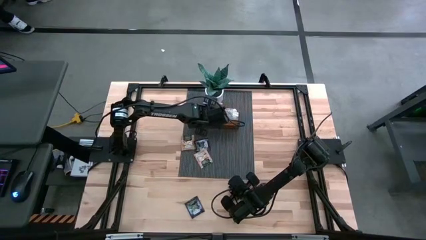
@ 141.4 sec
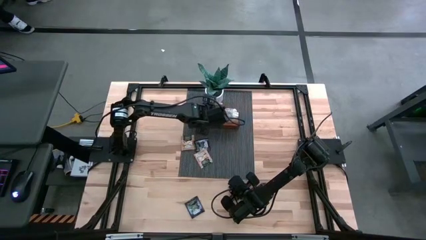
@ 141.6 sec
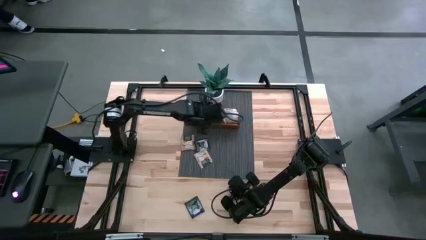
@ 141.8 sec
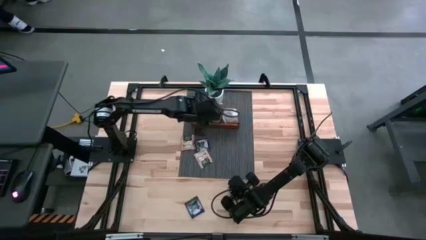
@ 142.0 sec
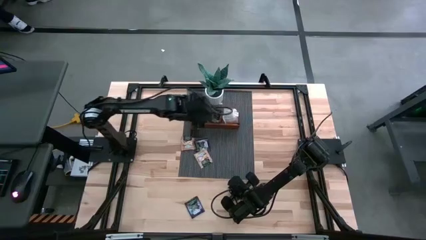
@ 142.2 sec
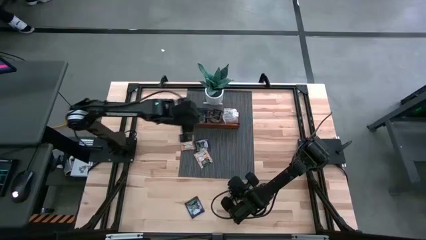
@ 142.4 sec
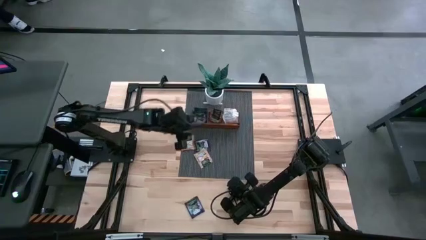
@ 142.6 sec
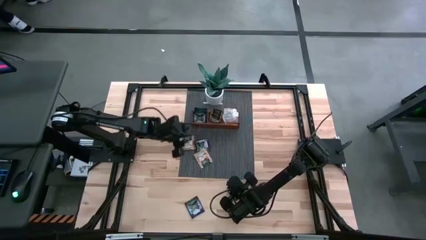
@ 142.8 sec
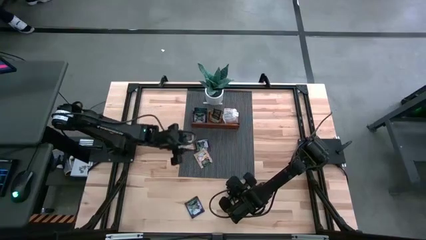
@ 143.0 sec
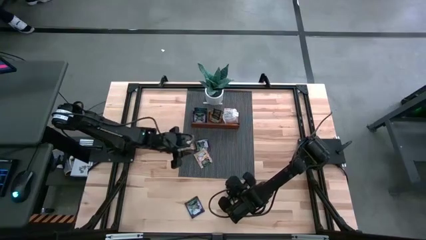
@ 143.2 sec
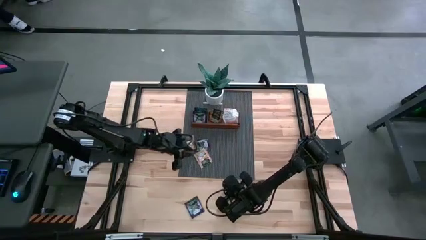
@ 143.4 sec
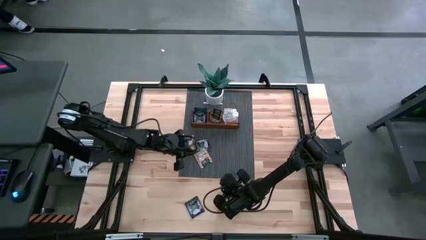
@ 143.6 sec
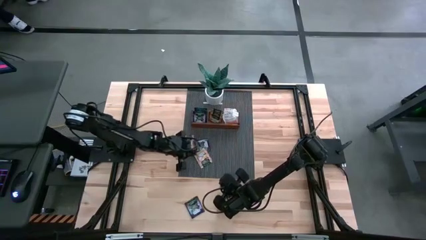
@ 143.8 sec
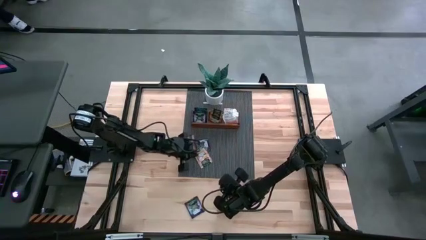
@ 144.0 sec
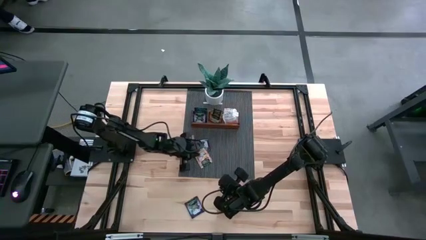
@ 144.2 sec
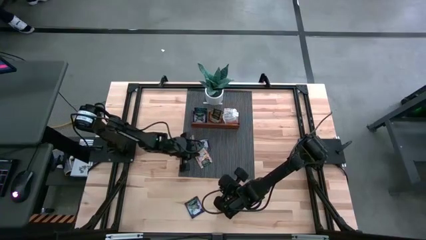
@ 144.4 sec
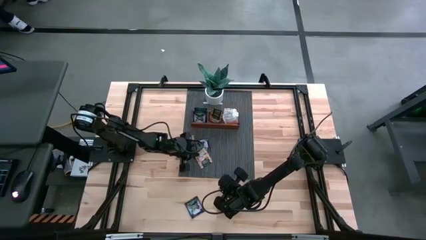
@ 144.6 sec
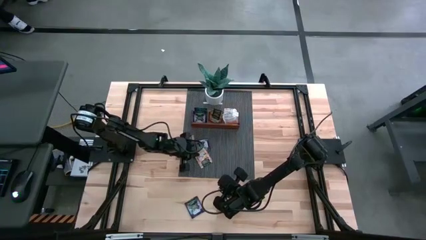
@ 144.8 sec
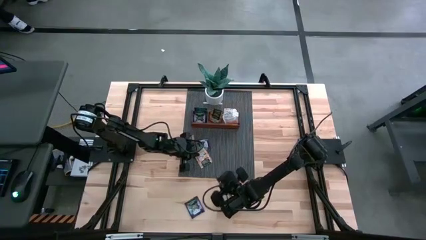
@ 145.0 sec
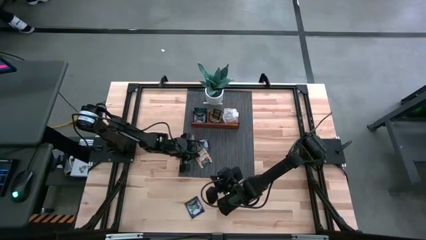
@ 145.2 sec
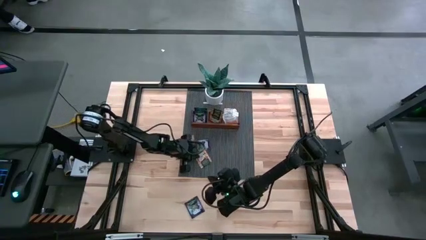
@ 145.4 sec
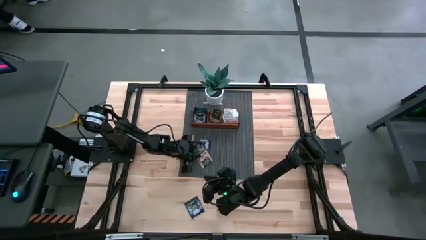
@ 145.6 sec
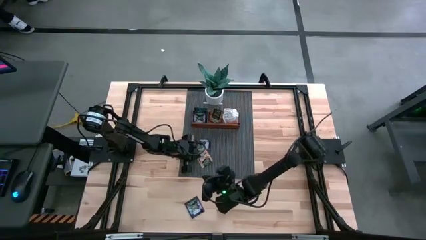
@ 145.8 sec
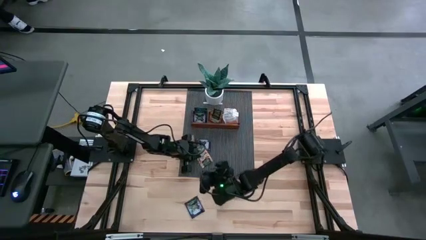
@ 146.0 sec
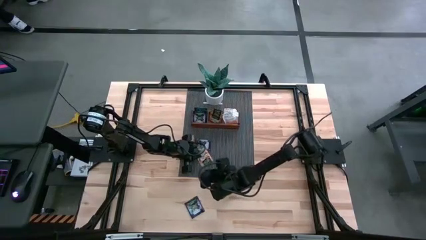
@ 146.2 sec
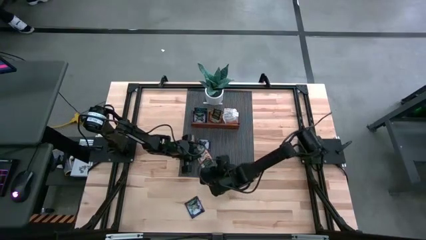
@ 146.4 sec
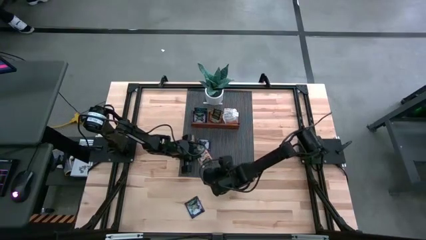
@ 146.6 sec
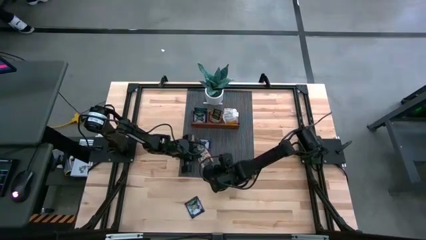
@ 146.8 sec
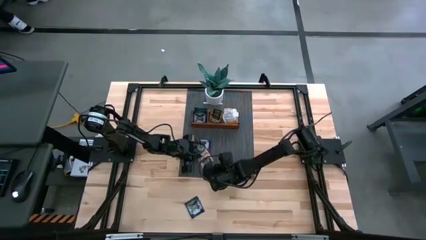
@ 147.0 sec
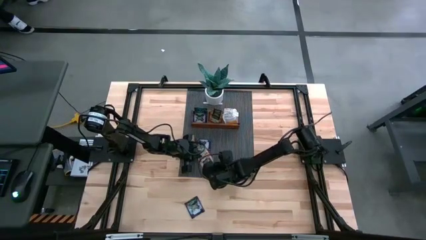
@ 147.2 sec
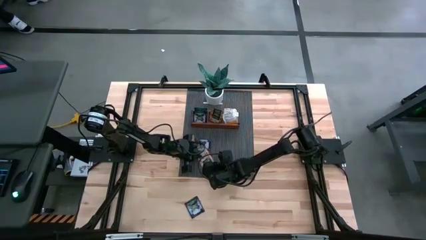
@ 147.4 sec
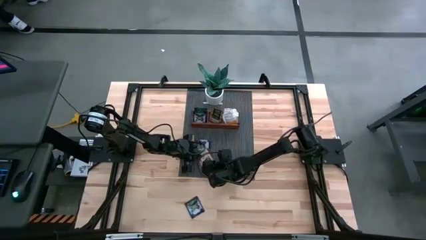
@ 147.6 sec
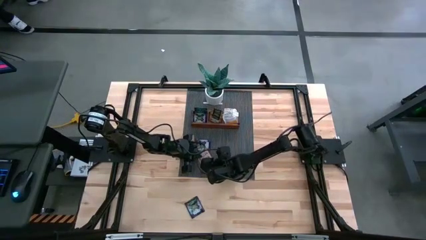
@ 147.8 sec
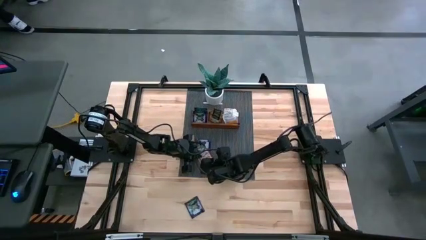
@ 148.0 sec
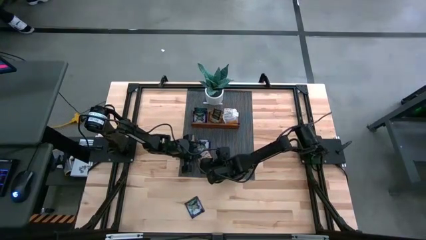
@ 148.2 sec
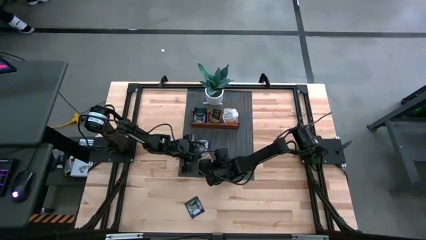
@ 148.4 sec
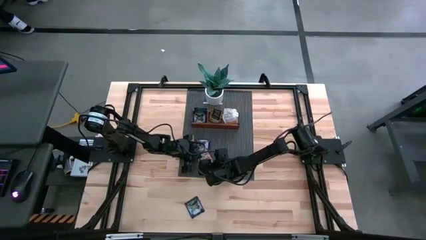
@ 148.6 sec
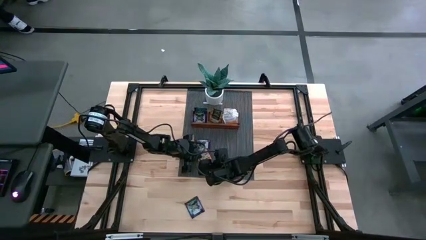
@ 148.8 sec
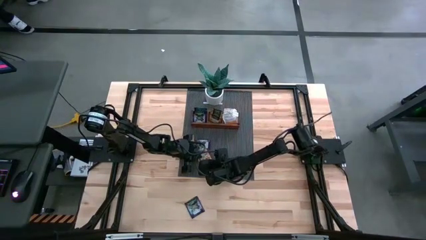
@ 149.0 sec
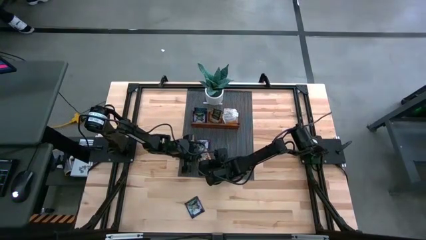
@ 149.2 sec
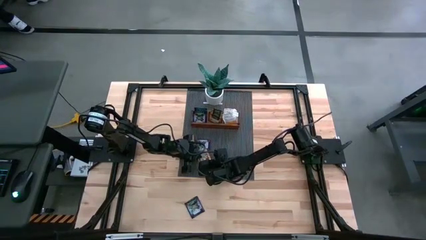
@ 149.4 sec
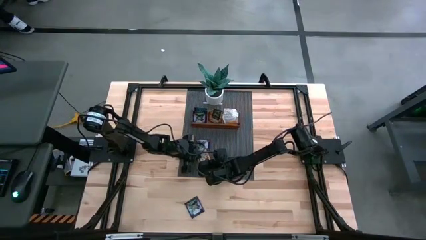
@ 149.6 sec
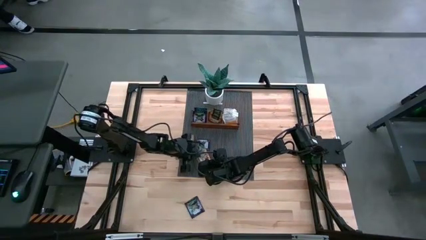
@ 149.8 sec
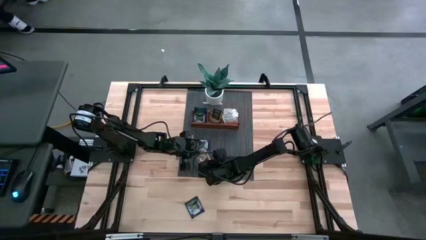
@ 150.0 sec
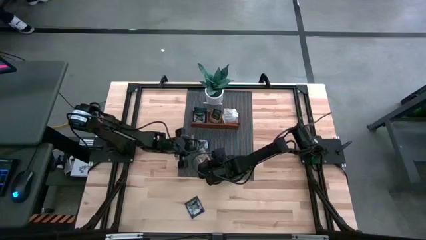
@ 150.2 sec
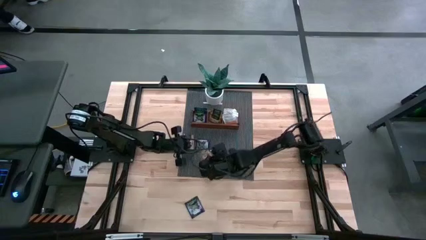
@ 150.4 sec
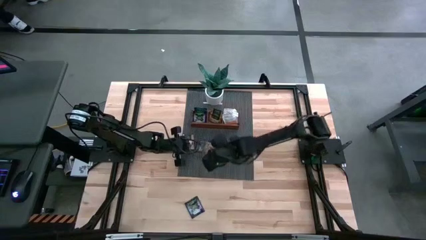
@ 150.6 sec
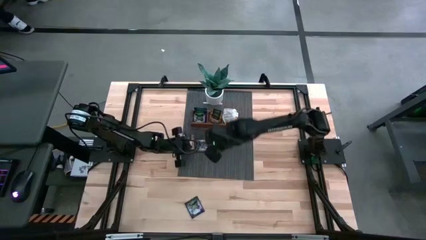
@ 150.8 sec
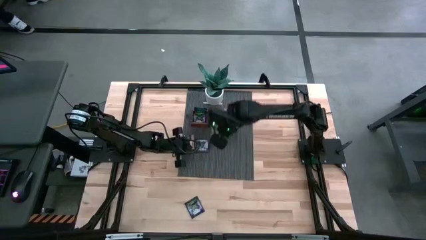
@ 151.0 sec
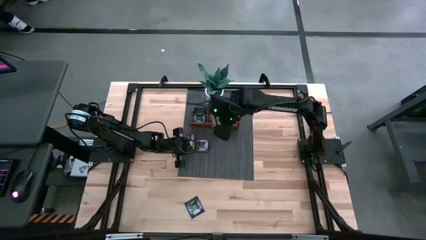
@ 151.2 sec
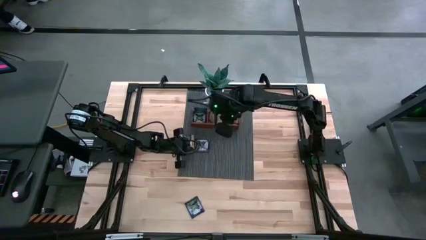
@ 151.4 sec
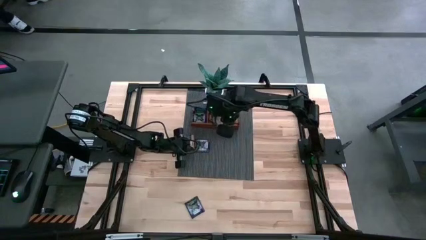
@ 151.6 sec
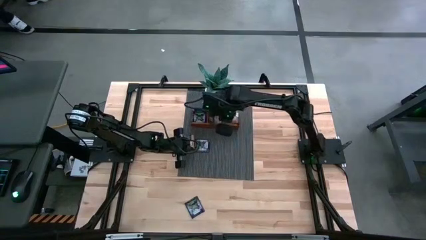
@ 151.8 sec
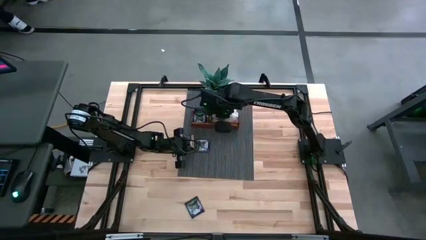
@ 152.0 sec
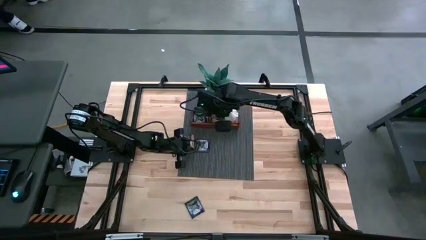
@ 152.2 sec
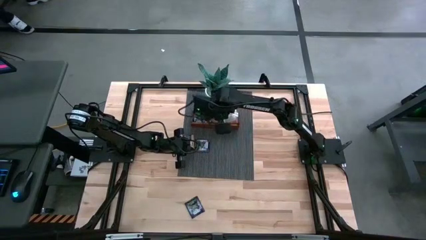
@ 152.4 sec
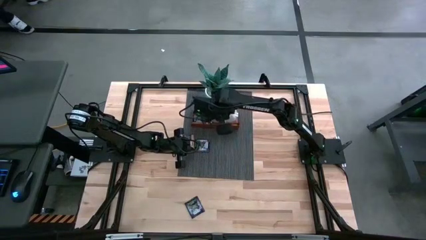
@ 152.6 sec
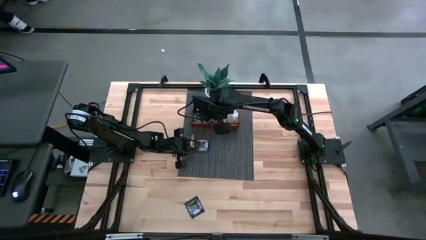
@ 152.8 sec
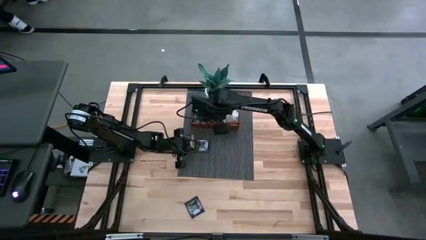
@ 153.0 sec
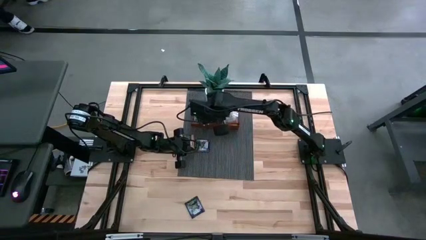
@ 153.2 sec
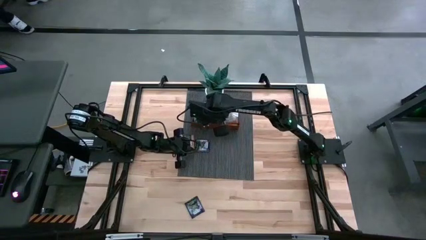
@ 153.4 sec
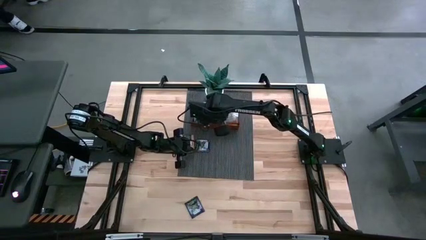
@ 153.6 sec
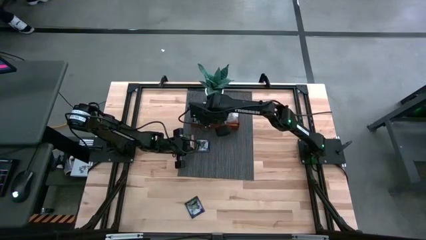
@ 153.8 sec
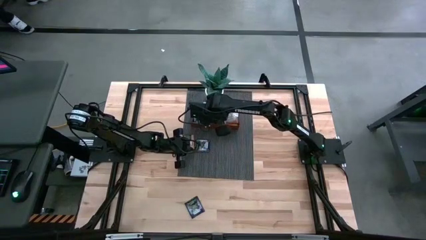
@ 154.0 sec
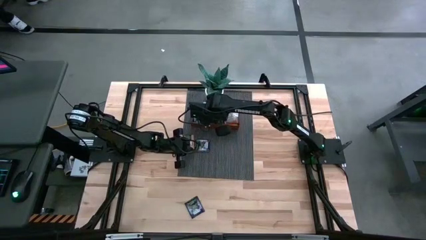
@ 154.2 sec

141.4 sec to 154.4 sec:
Task: Pick & Place Tea
Put the brown tea bag into the middle section of the wooden organizer

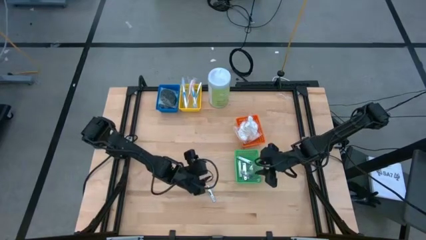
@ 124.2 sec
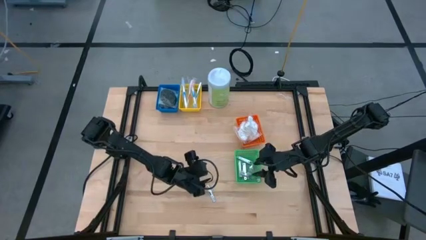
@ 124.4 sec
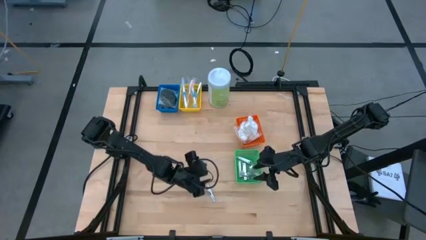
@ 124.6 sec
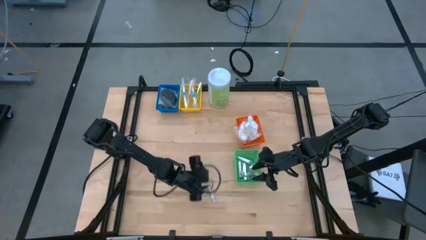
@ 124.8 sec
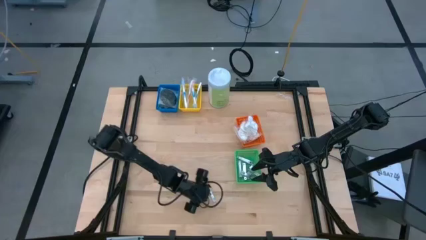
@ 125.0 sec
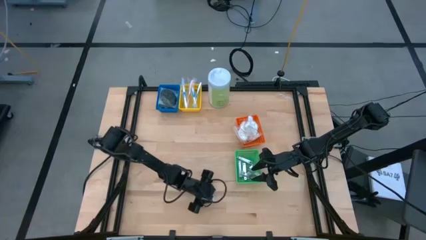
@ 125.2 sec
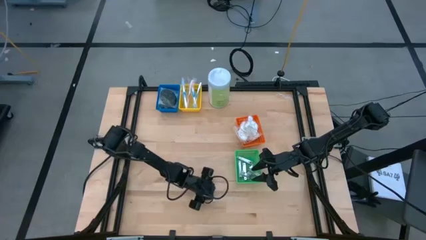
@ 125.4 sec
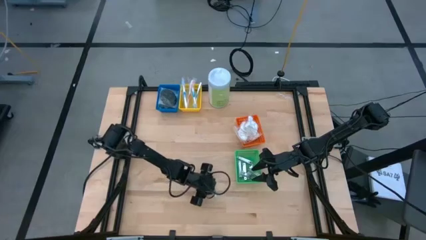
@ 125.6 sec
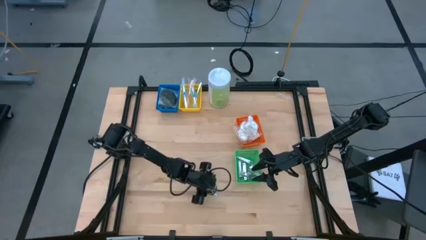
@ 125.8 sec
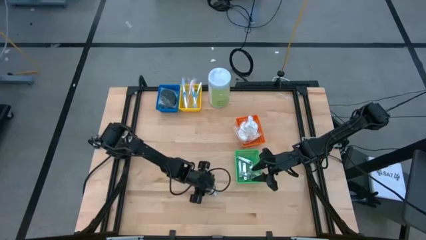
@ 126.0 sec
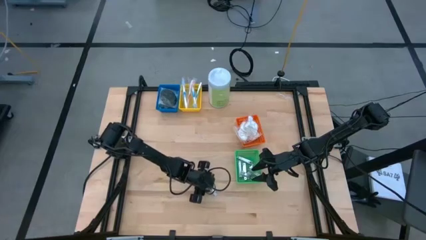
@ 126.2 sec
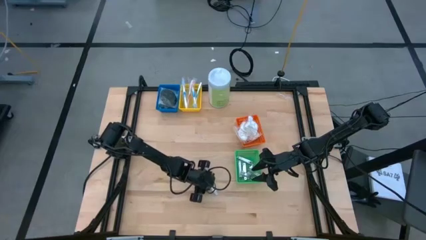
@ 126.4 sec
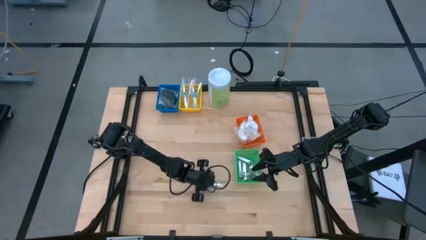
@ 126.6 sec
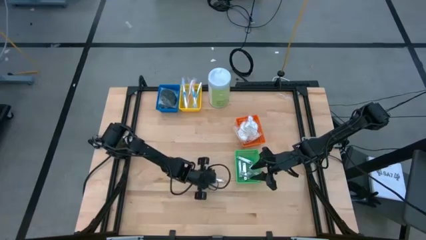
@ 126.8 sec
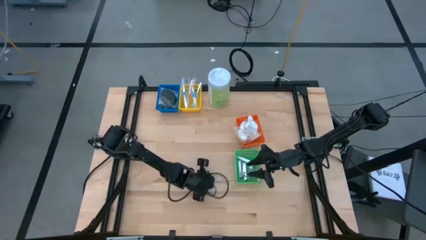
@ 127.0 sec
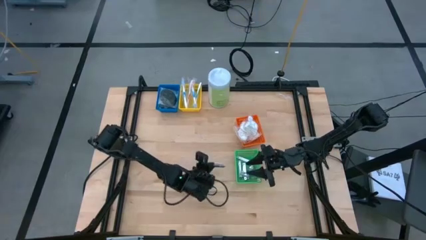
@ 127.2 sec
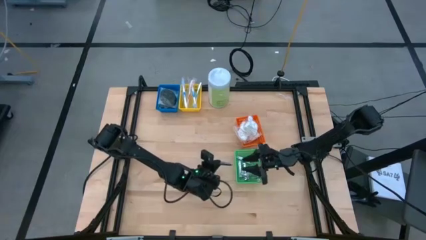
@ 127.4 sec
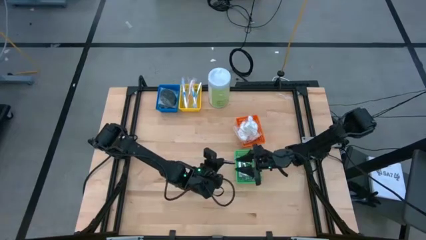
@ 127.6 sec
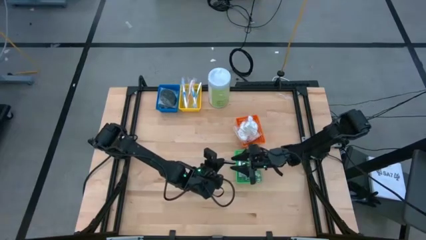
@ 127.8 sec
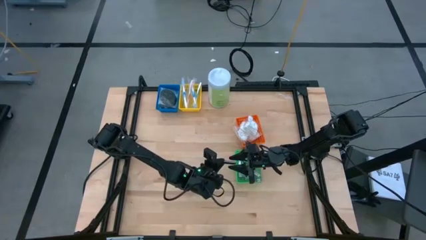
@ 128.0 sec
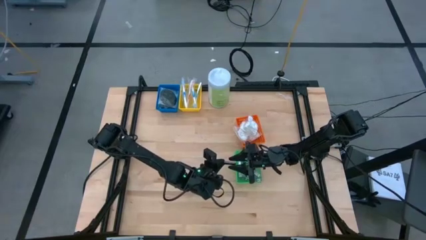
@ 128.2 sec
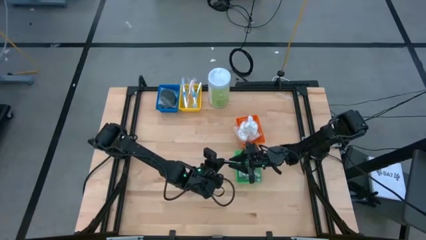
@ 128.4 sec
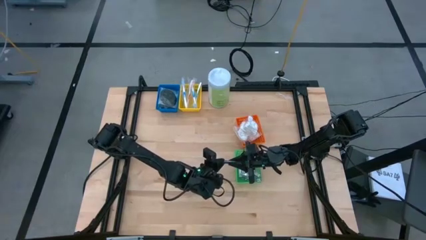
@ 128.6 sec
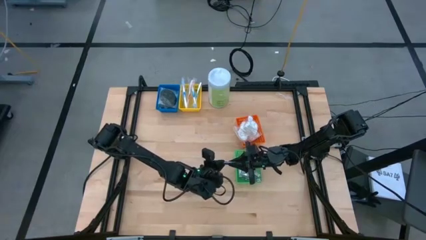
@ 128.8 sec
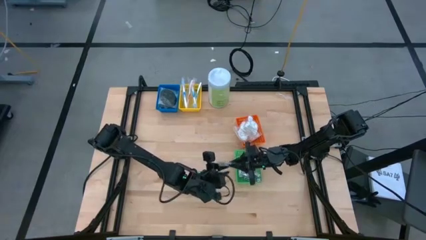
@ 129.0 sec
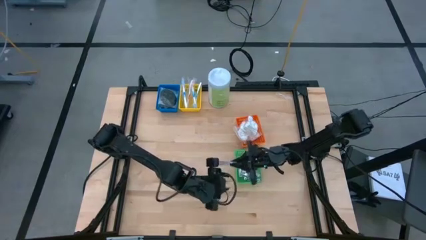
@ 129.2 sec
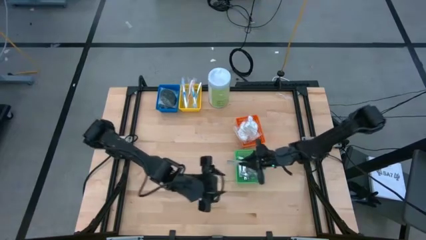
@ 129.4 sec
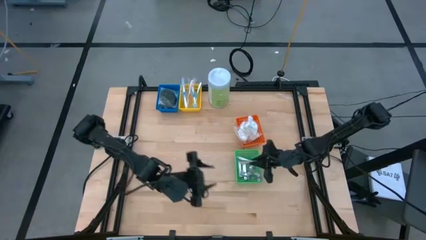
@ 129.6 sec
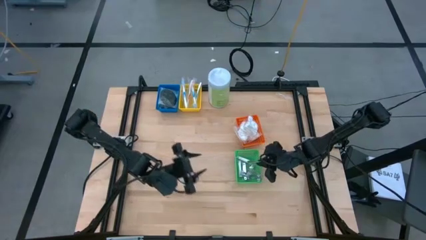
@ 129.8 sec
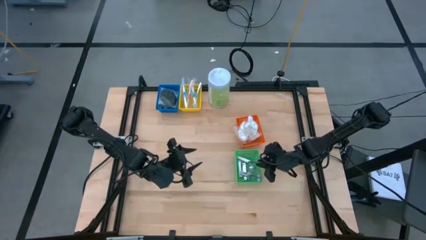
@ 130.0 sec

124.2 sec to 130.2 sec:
Task: Pick & Place Travel size toiletries
Put the nail cutter into the green bin
